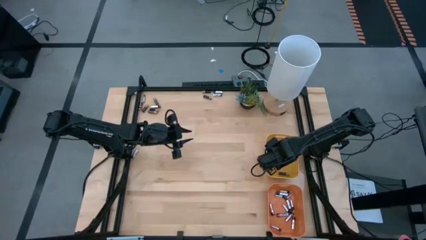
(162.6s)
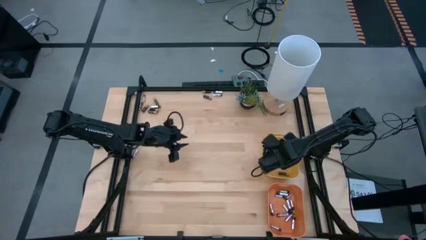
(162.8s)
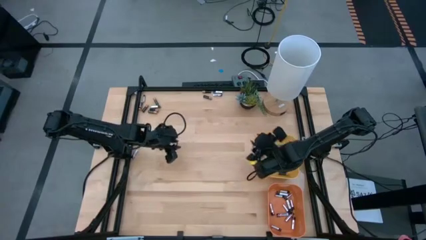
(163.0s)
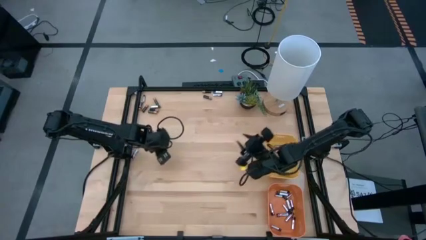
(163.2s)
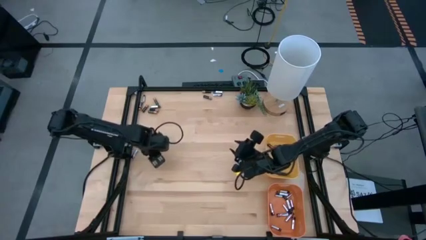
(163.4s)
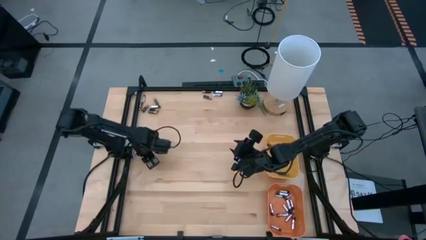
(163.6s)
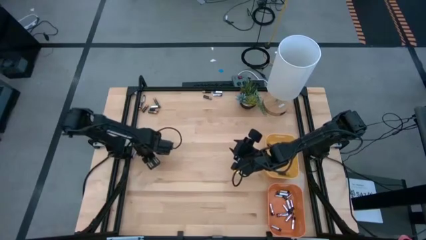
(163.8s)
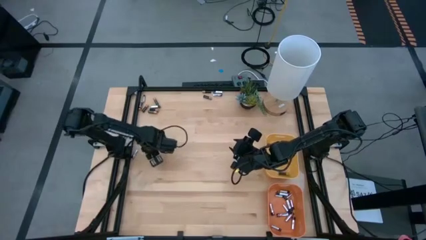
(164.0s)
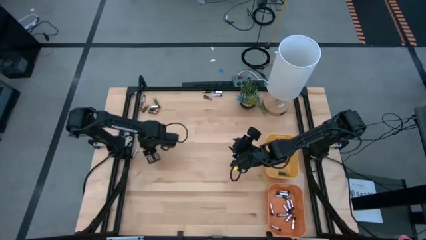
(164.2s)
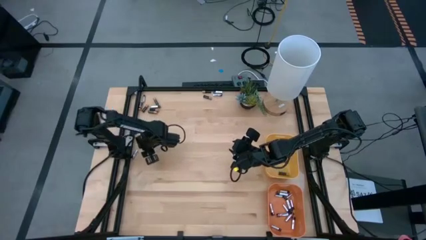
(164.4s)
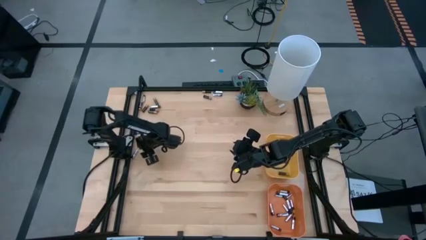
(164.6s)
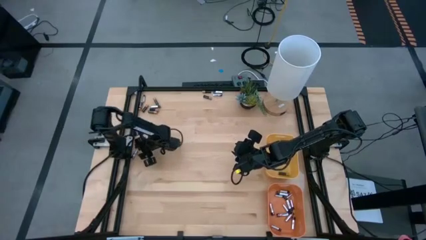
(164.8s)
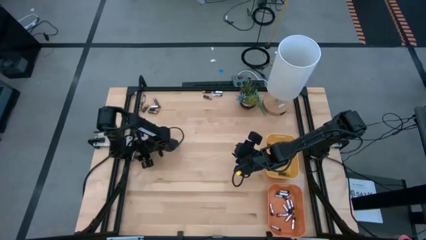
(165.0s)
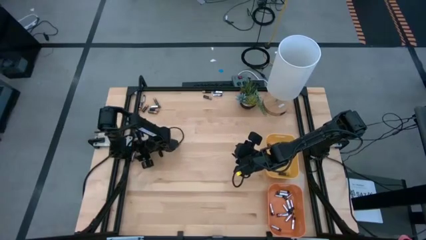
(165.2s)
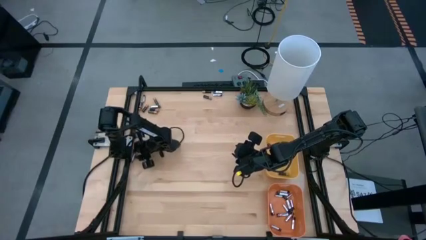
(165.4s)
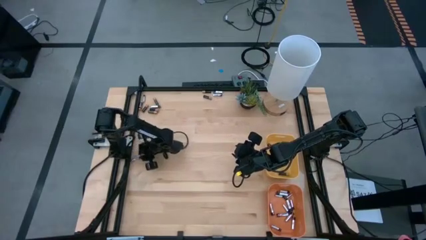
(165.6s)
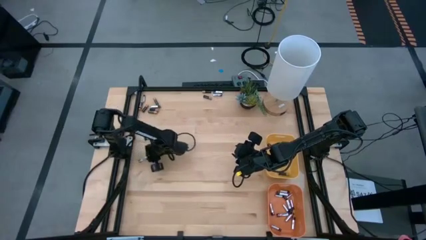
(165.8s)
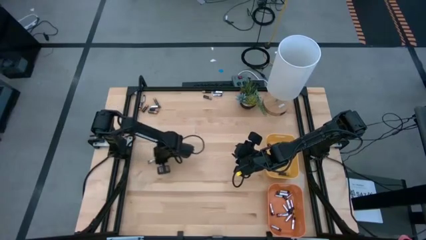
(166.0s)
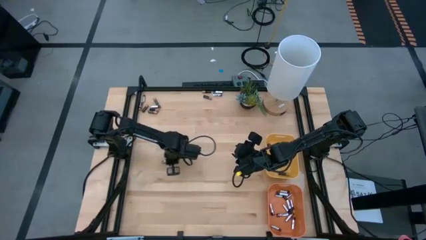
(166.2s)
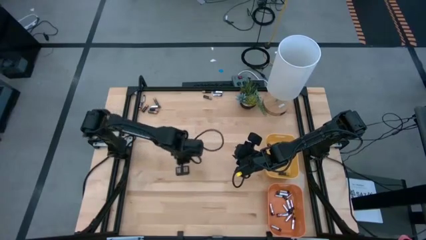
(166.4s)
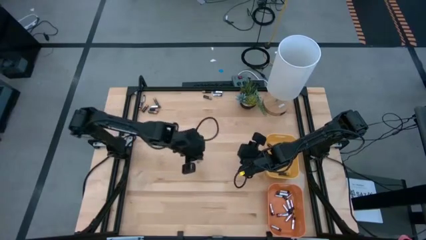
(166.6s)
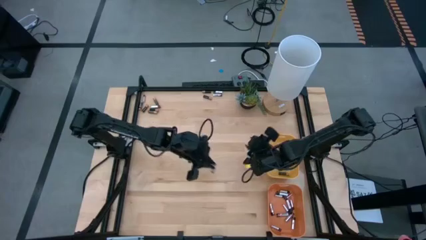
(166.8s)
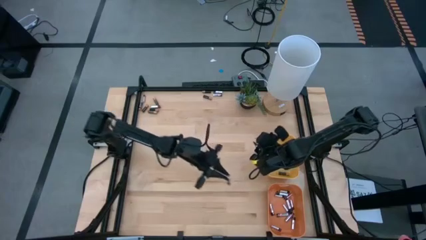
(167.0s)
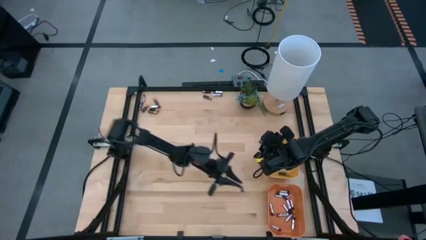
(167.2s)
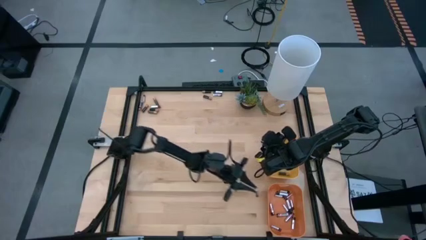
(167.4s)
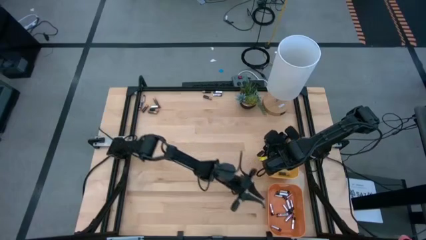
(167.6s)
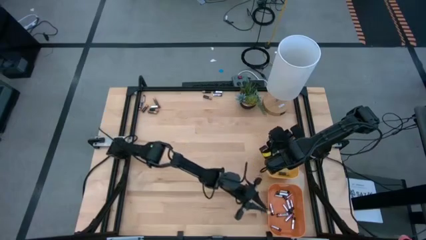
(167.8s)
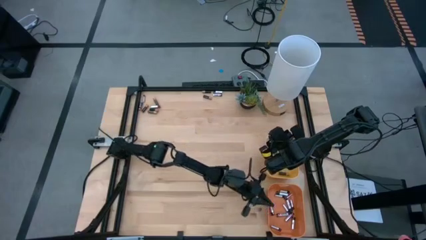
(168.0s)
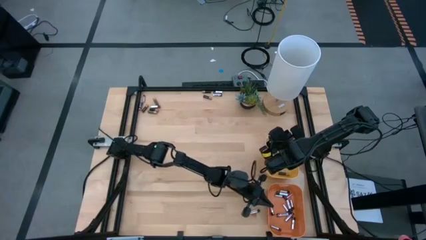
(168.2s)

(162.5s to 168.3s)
Task: Sort batteries
Put the black battery into the orange bin

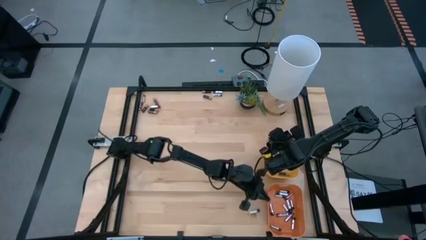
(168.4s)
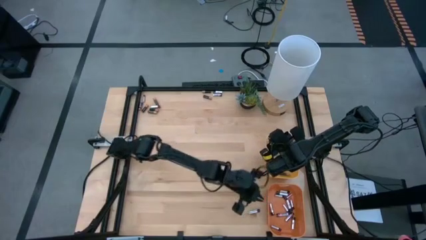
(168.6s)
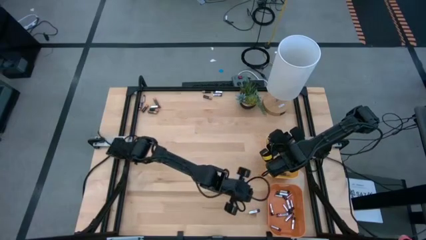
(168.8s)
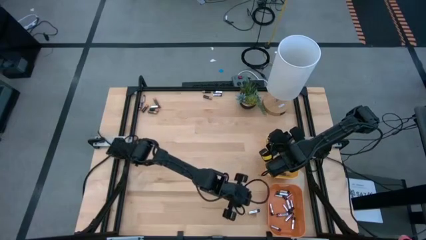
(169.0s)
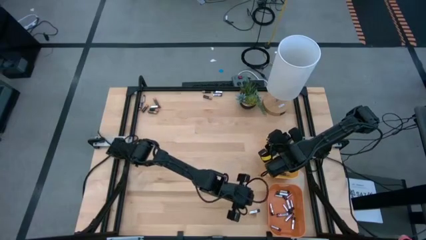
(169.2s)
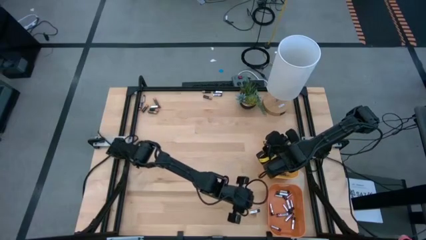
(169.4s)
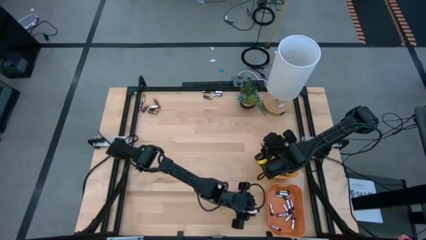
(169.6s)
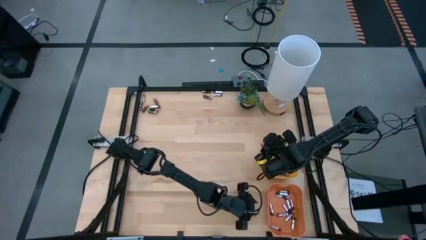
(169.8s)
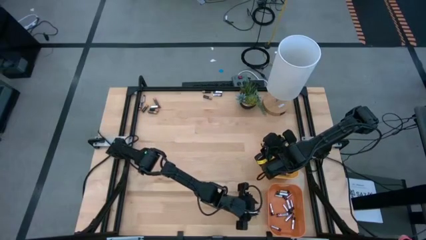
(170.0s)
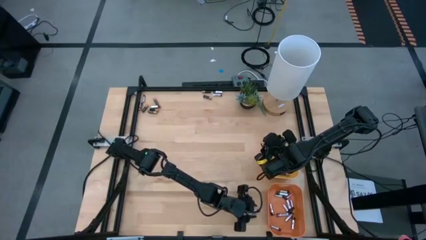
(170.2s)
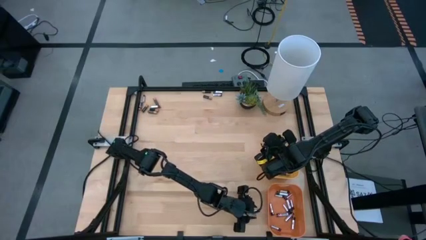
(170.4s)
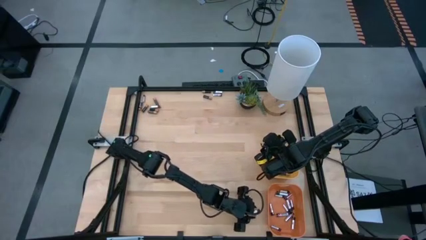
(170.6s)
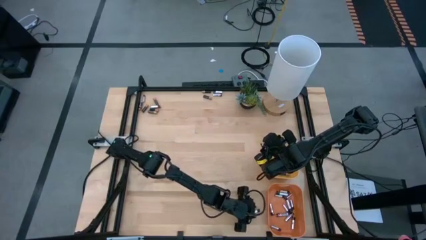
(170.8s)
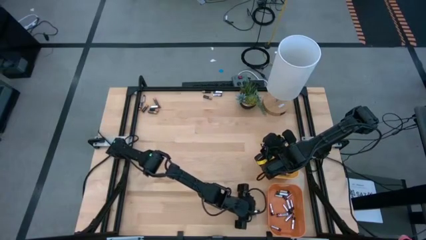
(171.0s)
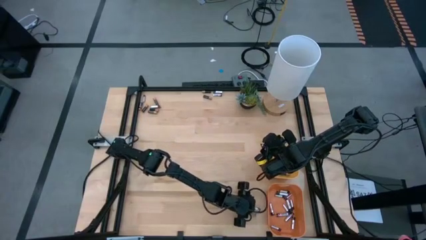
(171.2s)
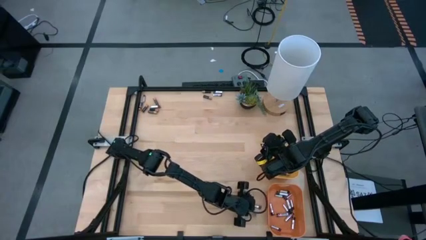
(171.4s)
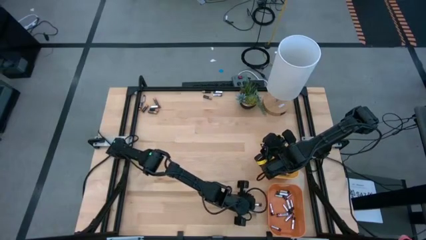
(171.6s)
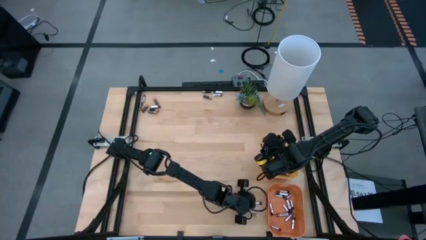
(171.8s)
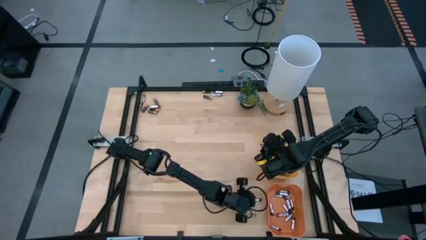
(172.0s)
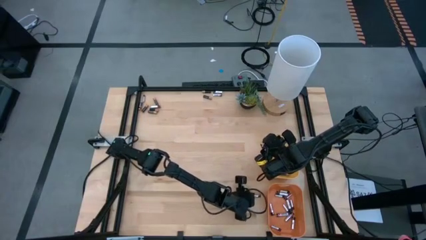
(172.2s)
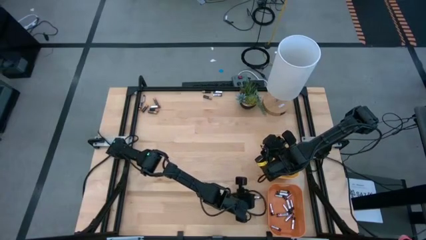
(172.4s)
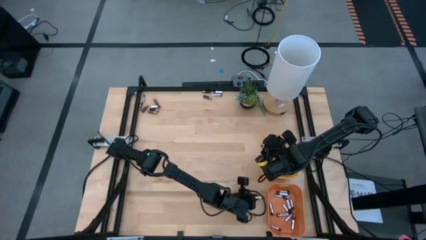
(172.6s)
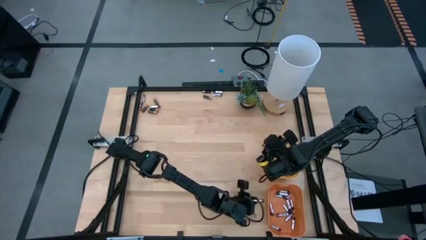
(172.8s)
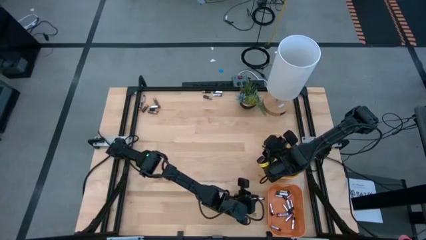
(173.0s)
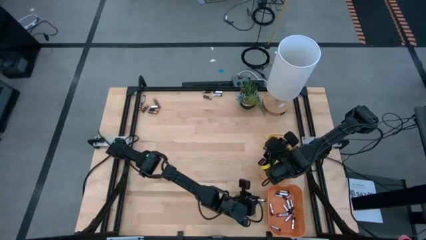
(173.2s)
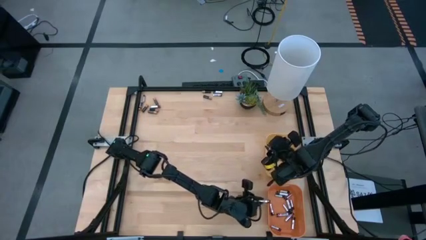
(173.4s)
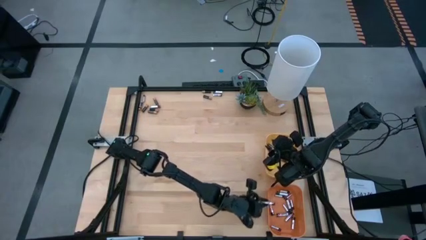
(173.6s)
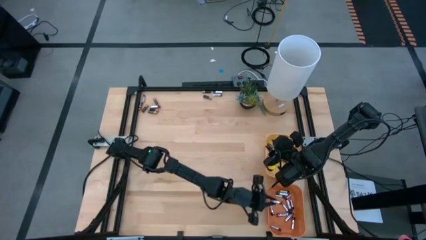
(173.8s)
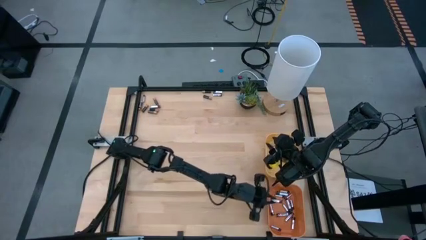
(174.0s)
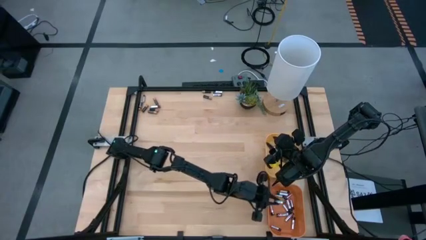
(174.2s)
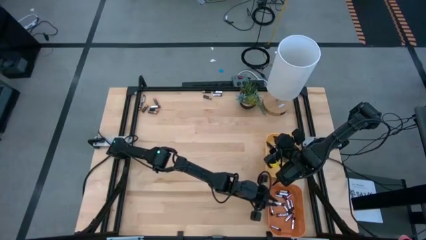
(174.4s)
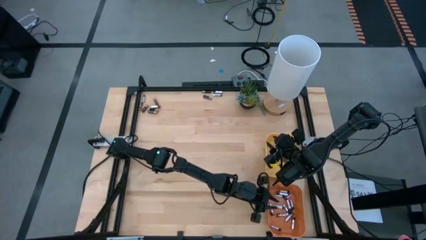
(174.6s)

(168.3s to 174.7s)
Put the black battery into the orange bin
